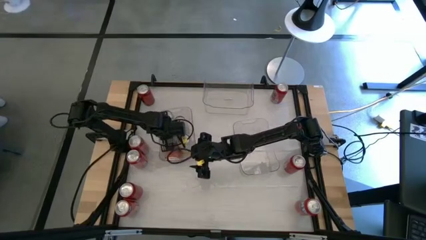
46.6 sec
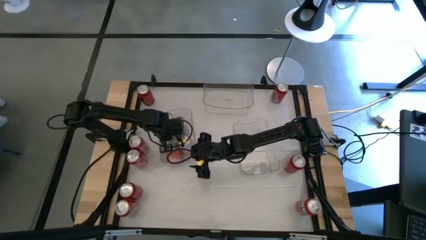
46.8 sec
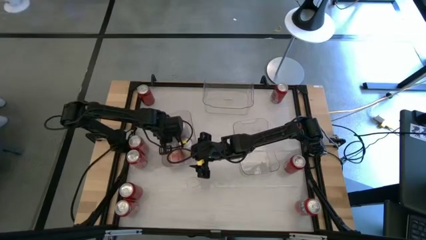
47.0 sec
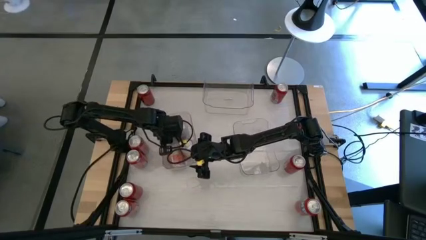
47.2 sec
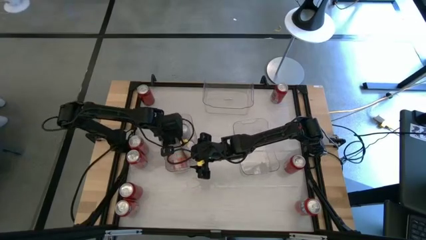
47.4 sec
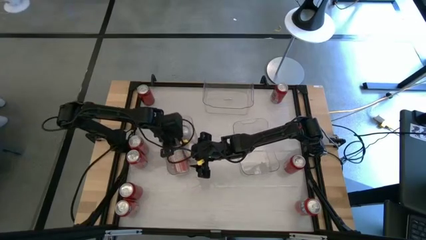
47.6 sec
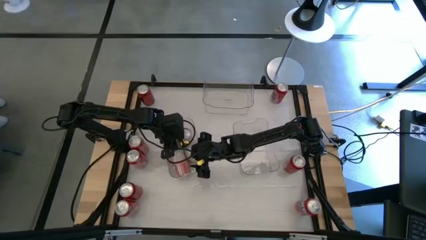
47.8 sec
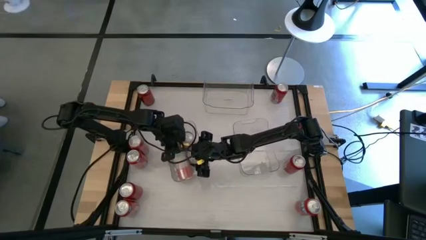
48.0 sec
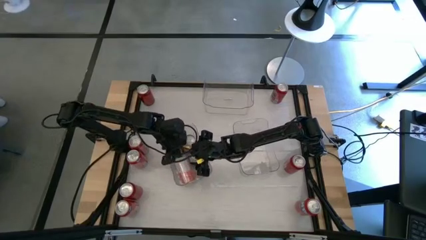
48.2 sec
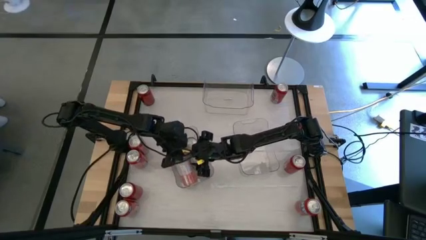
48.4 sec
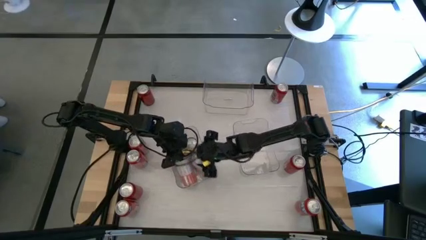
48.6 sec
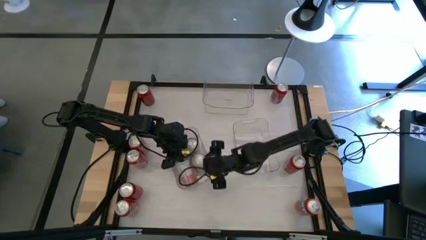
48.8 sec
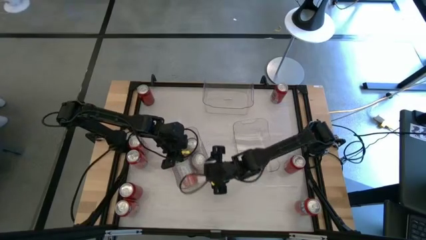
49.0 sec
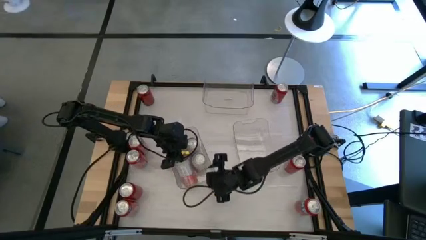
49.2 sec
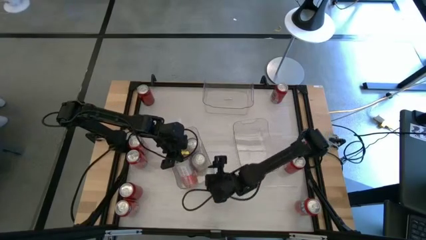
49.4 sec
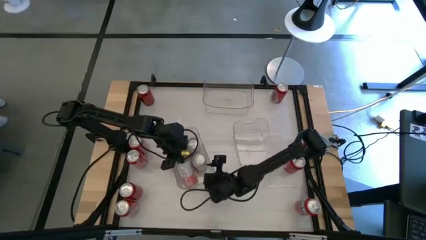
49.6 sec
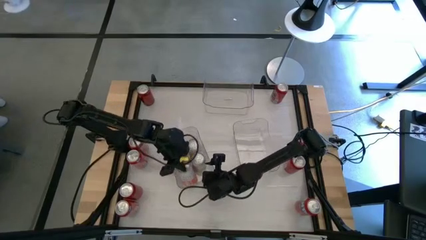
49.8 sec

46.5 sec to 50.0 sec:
Task: Sort soda cans
Put the orange white soda can into the left transparent bin

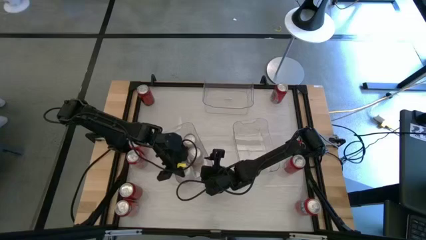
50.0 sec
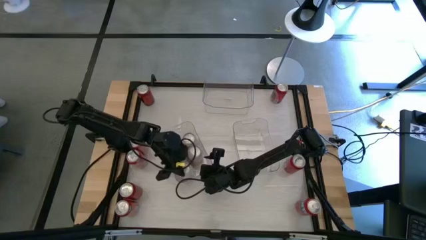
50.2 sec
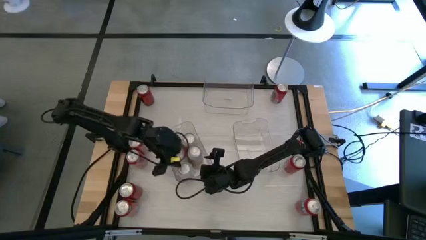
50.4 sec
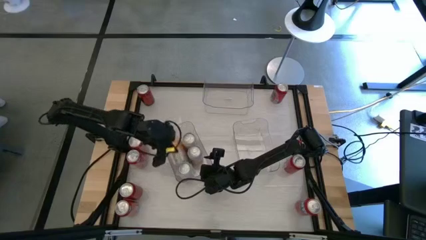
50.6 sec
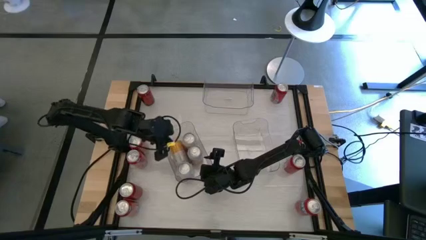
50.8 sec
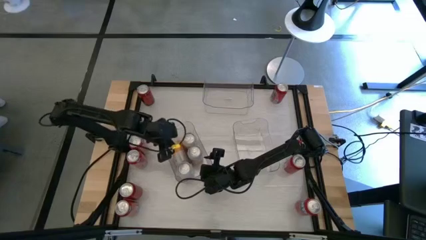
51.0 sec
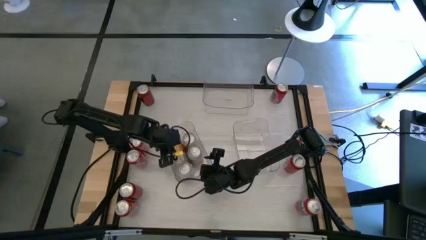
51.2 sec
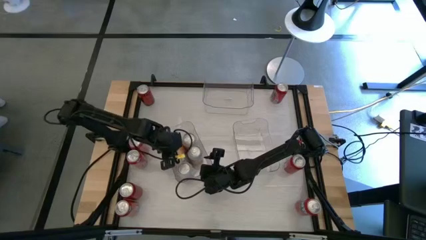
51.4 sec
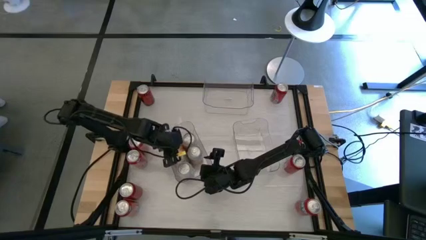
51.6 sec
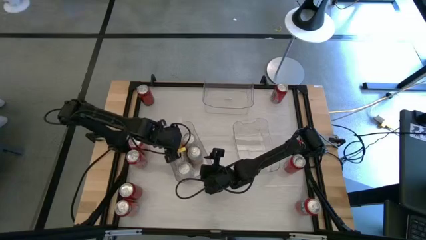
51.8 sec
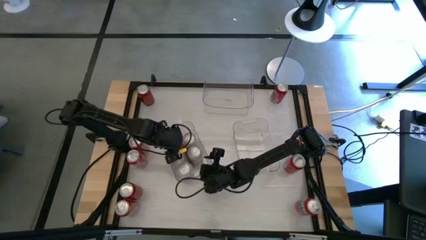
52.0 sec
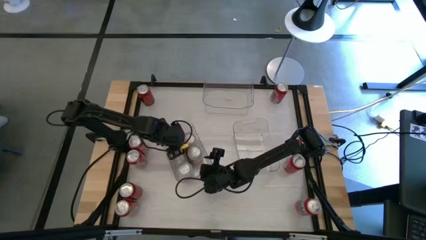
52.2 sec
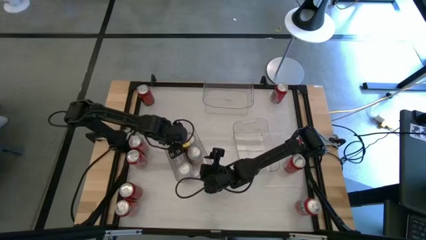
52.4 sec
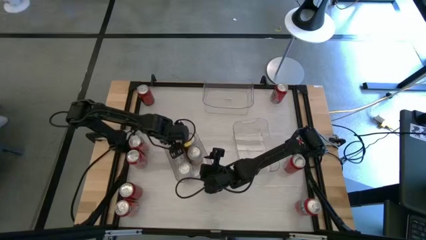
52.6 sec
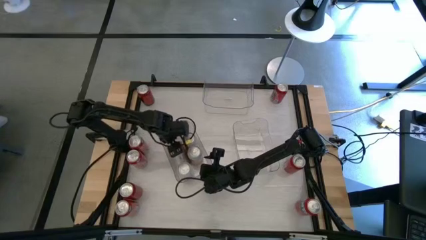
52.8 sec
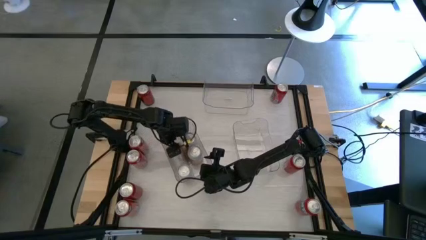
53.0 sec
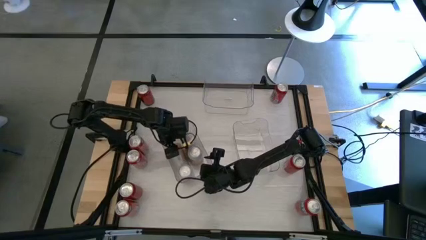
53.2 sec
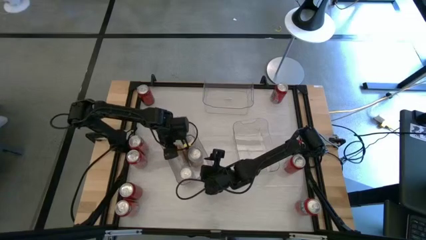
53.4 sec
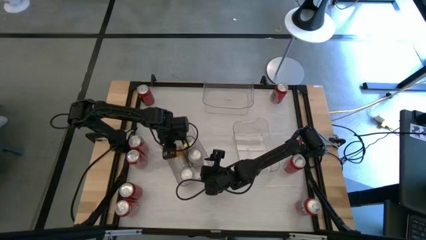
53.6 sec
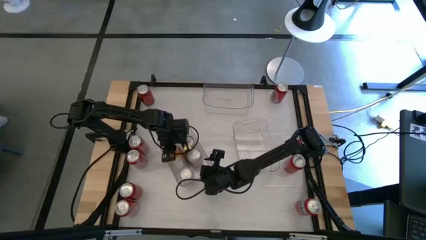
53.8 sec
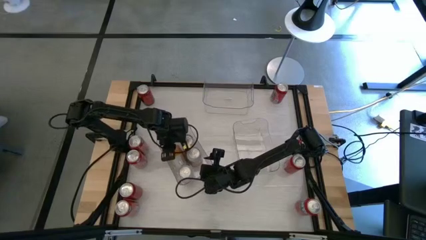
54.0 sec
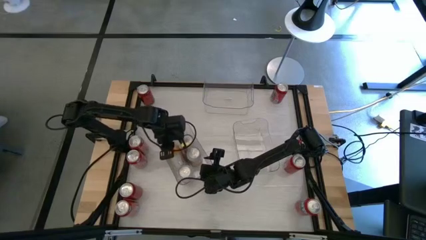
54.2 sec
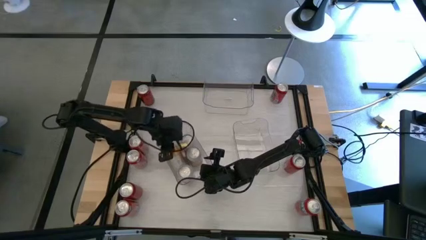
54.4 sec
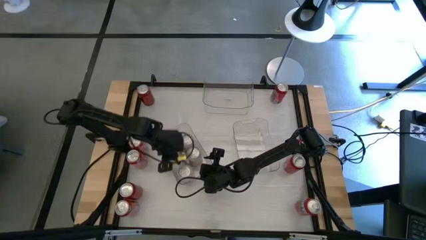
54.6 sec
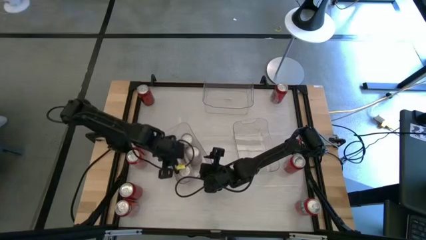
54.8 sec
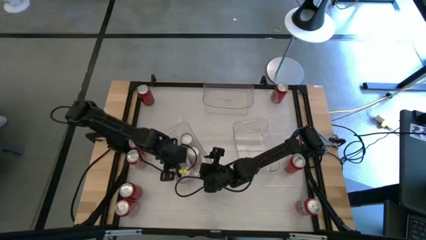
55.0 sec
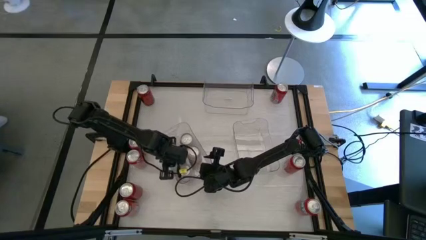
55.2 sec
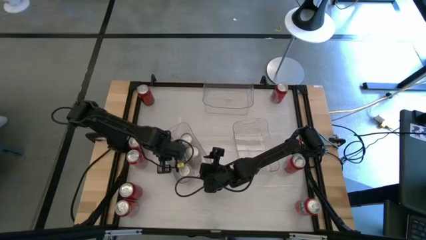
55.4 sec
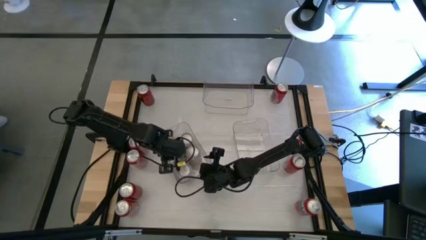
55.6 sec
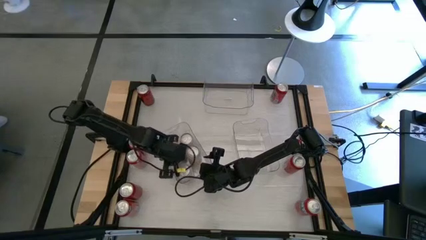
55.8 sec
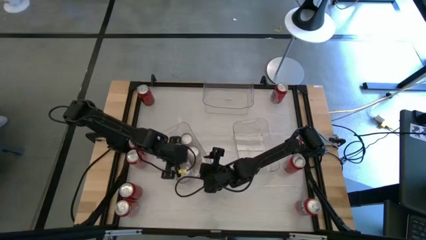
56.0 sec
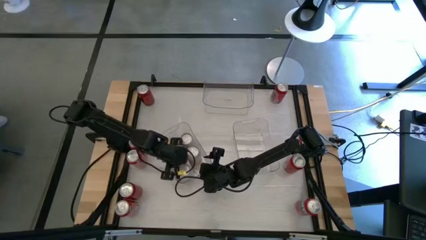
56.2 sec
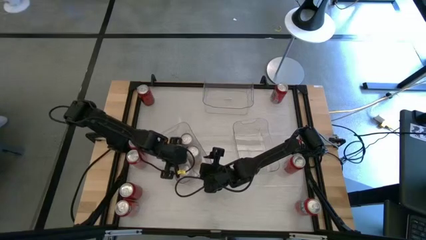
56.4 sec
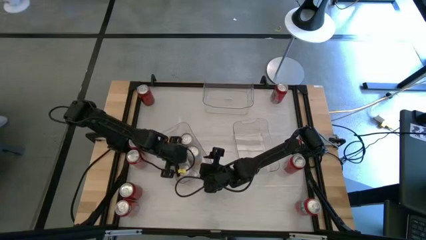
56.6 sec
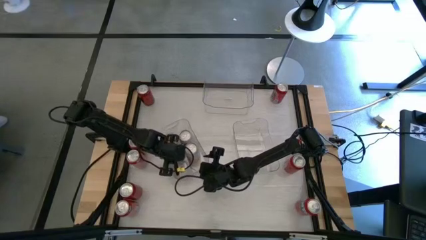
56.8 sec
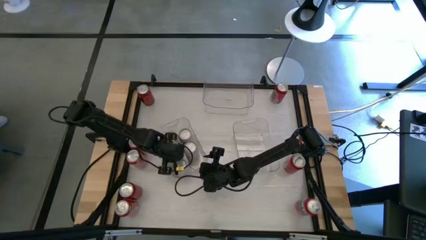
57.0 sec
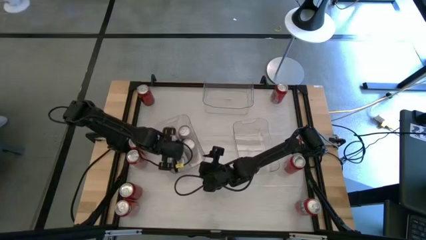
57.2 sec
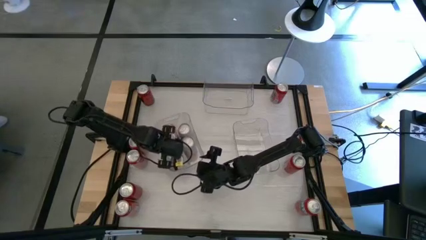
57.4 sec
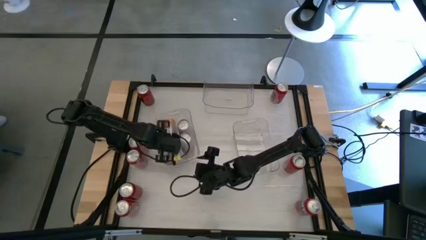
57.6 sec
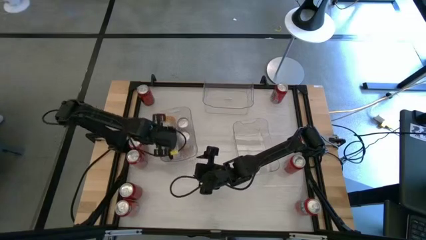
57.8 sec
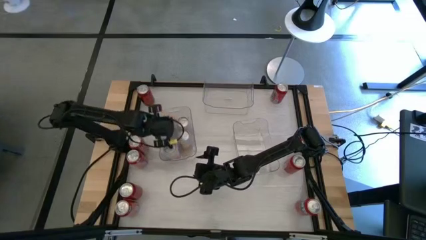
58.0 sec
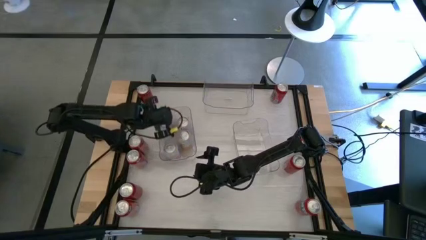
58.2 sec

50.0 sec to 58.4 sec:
Adjust the yellow white soda can on the transparent bin
